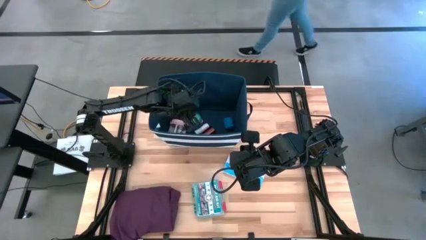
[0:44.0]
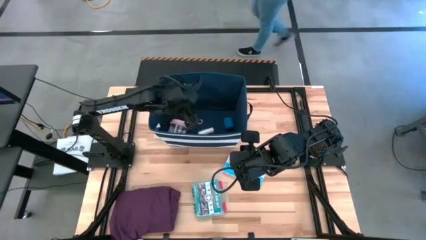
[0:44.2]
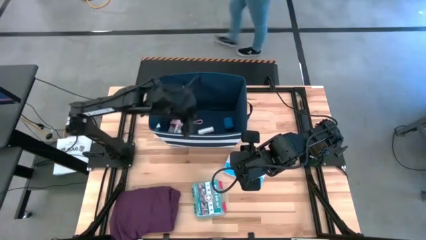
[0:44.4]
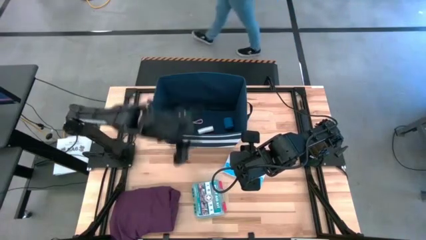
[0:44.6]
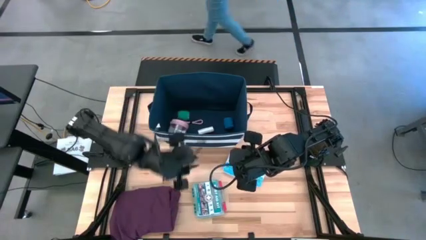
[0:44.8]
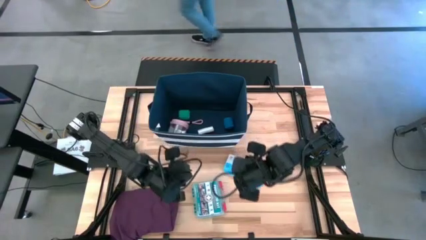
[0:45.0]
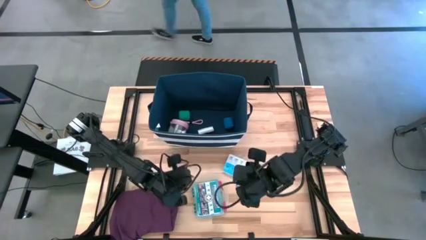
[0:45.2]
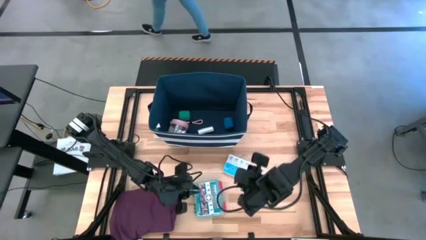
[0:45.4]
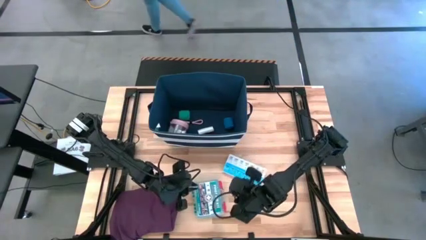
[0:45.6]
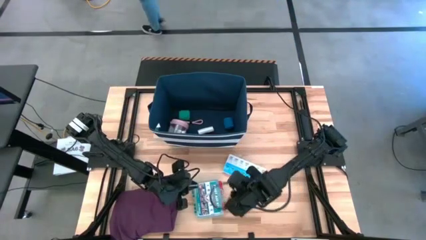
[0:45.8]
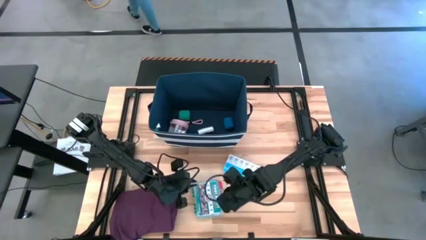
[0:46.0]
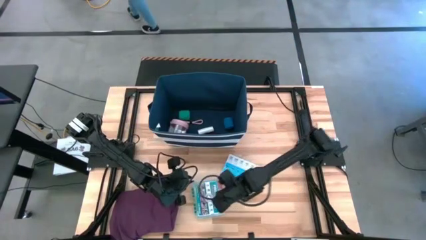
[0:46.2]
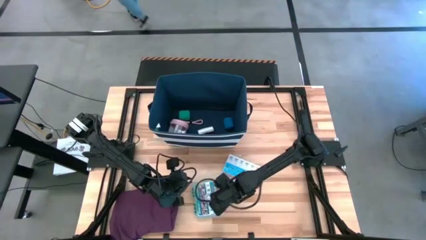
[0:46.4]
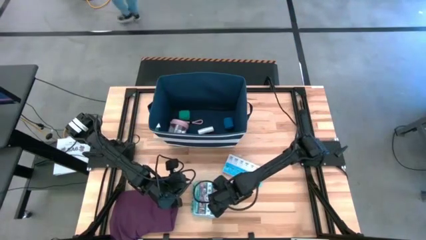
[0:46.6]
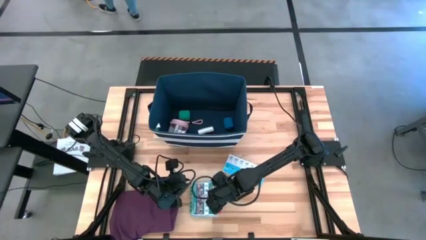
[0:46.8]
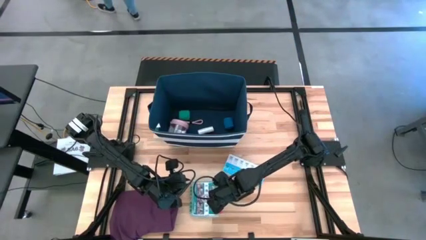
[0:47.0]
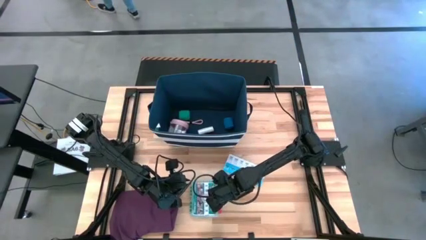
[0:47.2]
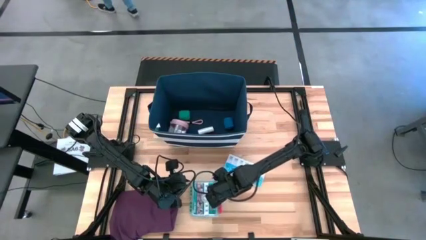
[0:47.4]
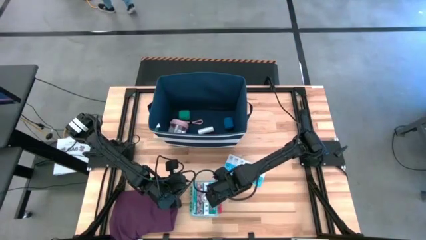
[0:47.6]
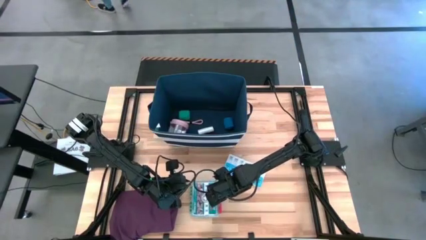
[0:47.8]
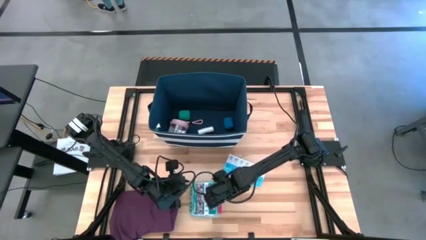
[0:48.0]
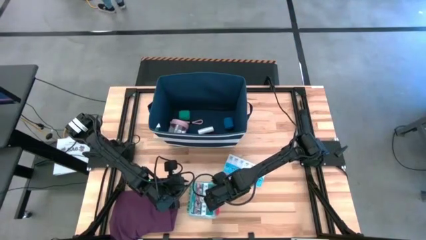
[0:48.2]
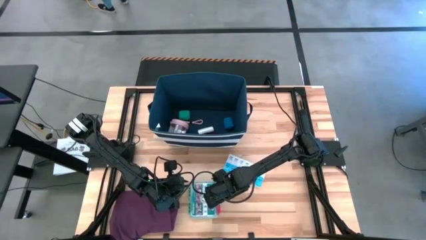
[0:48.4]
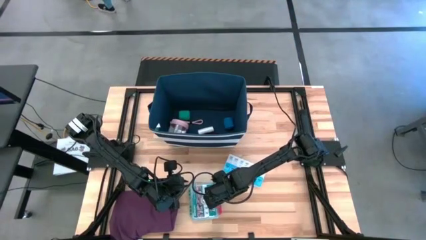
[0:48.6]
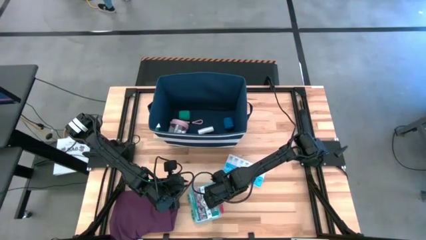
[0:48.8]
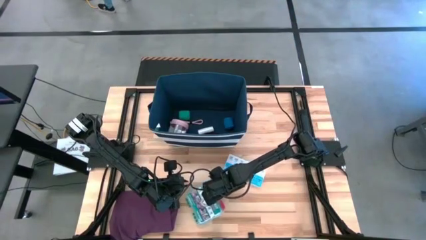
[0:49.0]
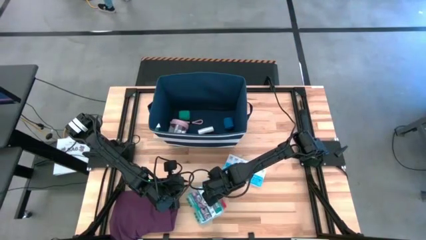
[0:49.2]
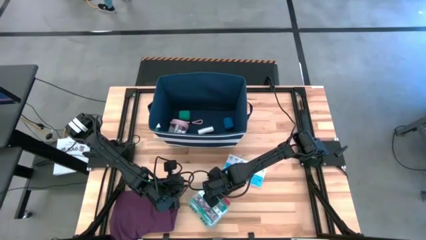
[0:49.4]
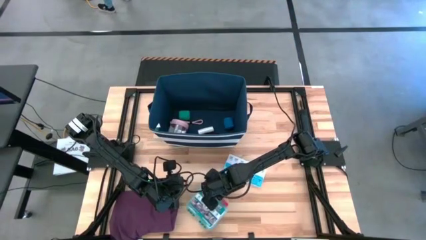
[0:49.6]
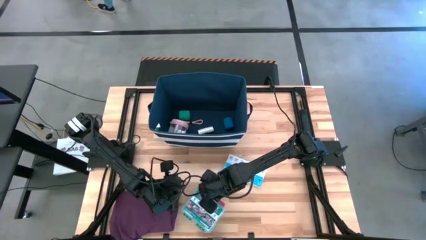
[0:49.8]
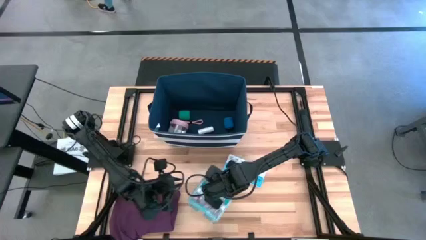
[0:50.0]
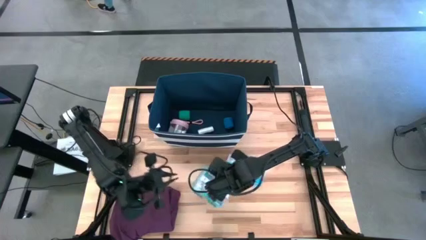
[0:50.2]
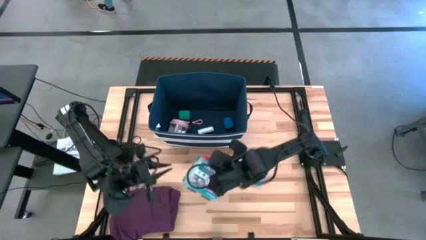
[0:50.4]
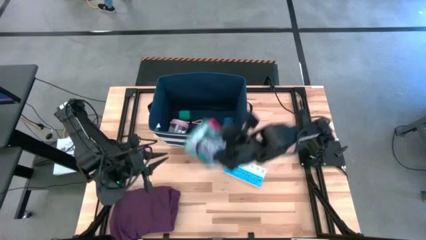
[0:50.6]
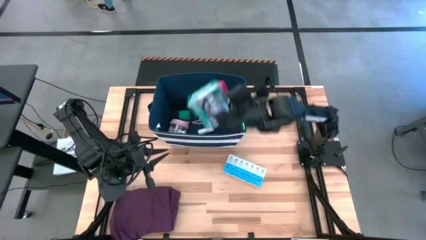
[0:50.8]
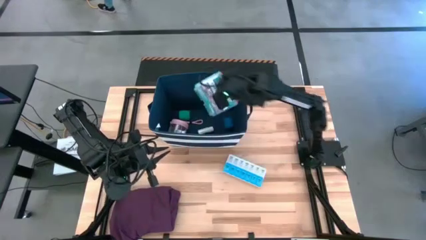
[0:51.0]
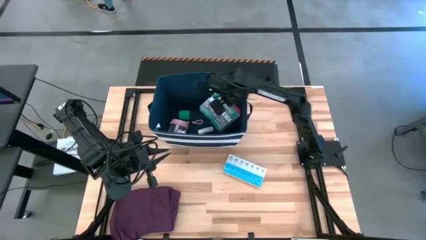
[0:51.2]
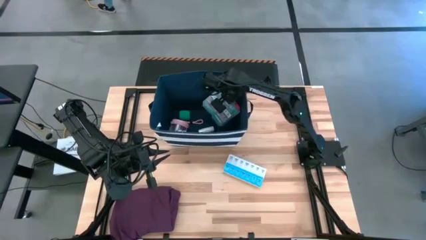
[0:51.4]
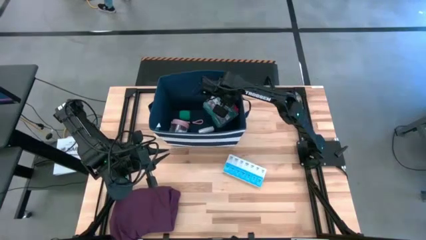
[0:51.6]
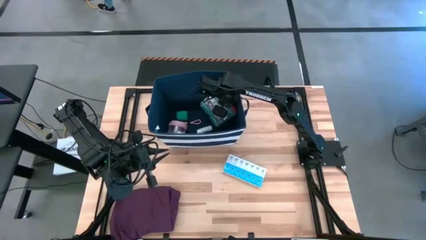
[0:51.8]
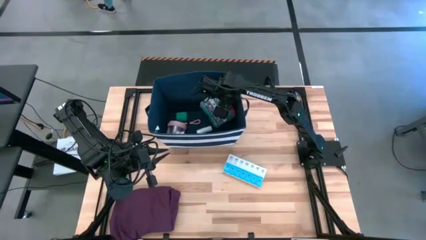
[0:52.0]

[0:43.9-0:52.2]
Task: Pick & place medical supplies in basket/bin
Put the green first aid kit into the blue bin

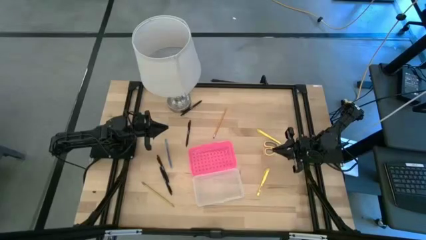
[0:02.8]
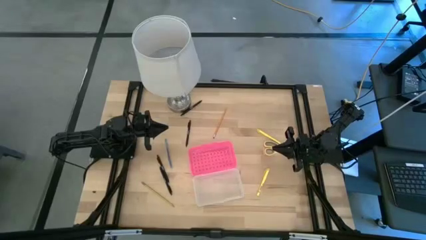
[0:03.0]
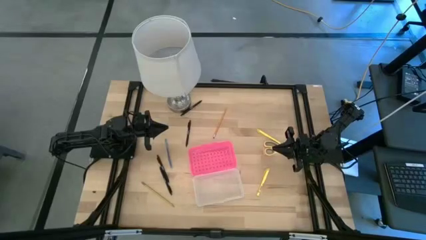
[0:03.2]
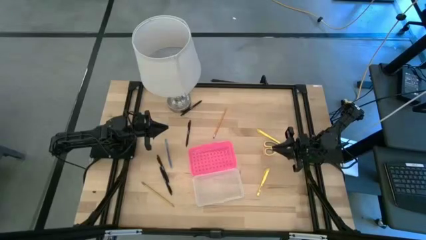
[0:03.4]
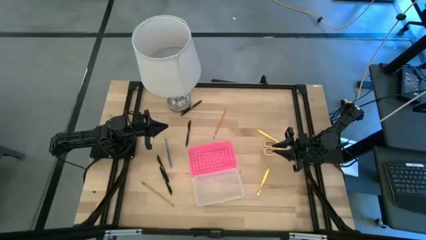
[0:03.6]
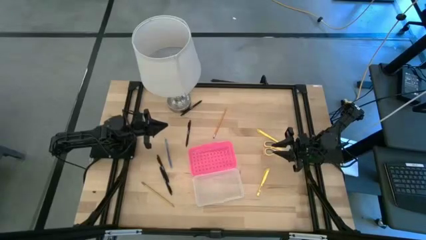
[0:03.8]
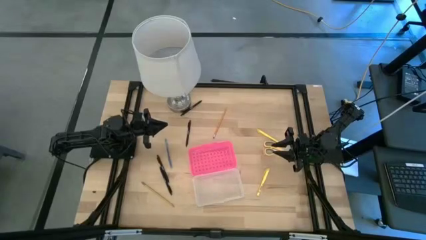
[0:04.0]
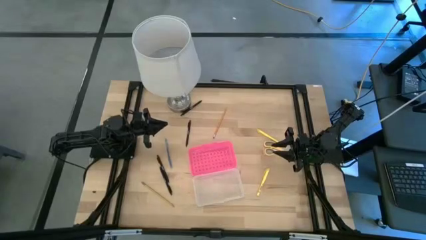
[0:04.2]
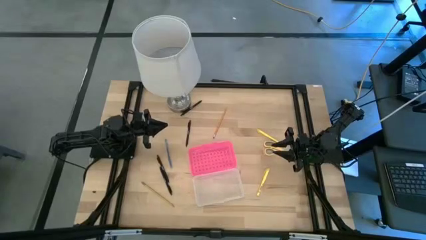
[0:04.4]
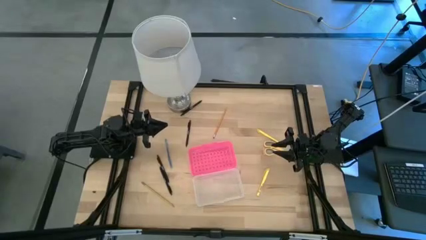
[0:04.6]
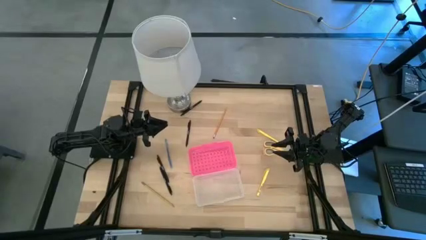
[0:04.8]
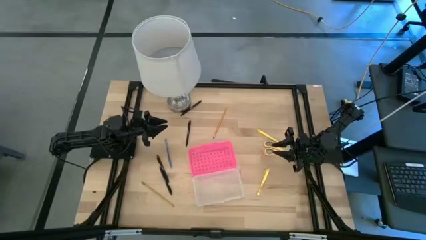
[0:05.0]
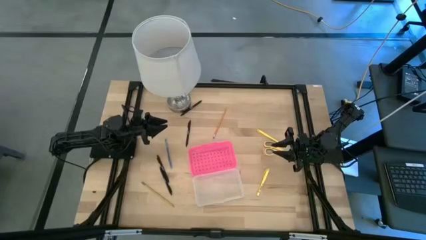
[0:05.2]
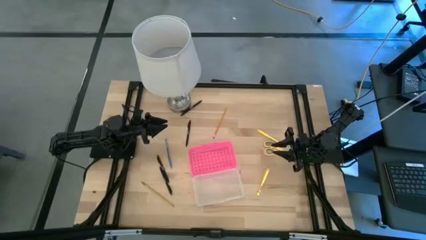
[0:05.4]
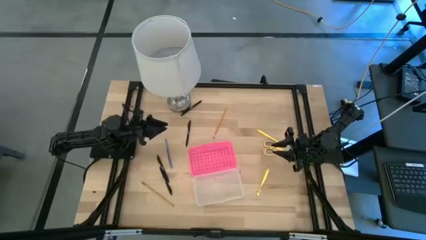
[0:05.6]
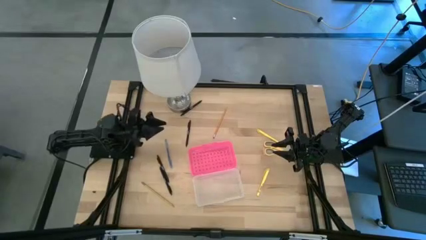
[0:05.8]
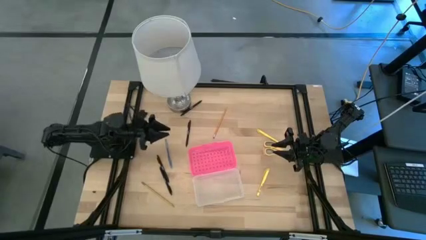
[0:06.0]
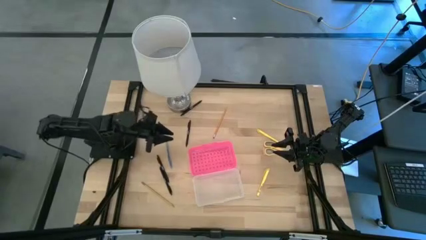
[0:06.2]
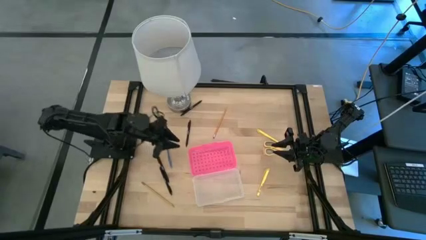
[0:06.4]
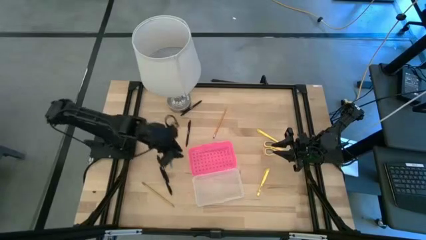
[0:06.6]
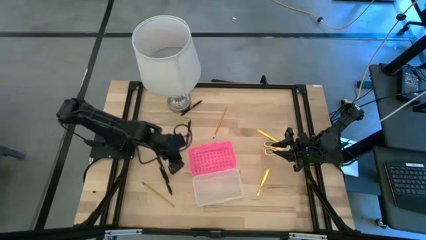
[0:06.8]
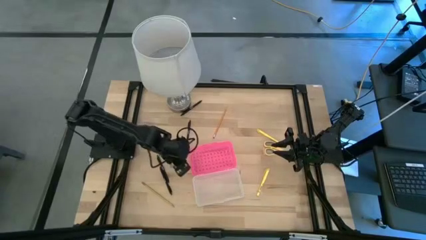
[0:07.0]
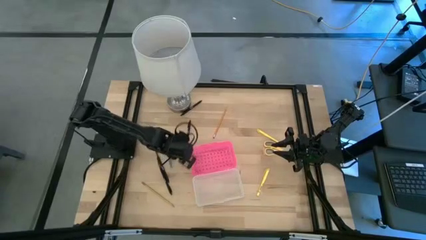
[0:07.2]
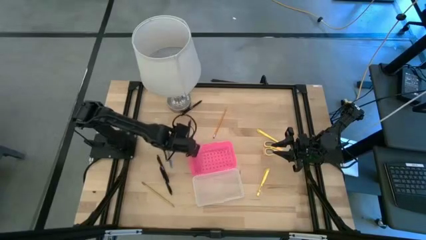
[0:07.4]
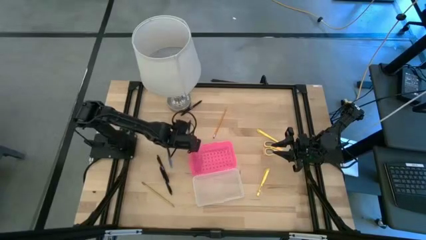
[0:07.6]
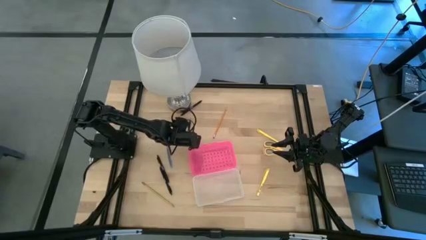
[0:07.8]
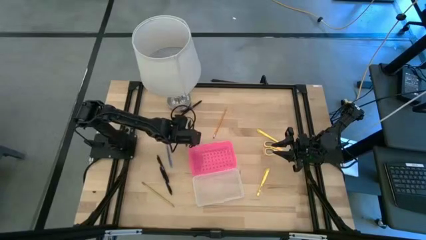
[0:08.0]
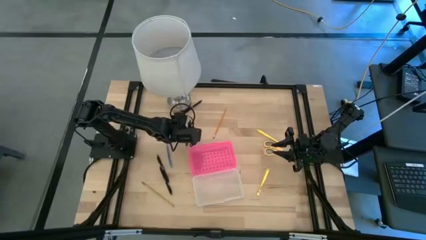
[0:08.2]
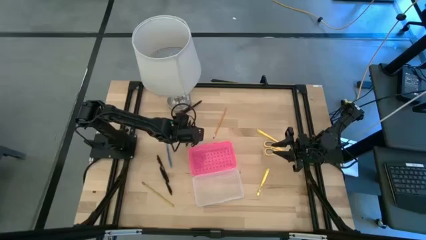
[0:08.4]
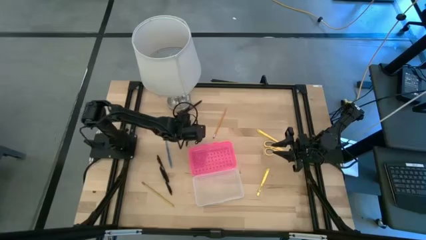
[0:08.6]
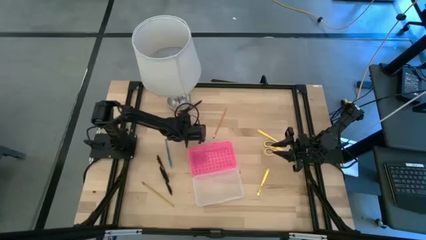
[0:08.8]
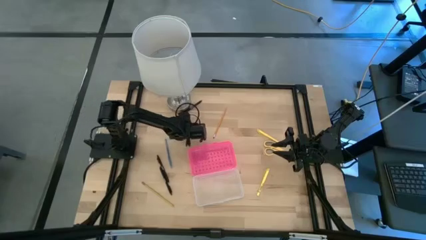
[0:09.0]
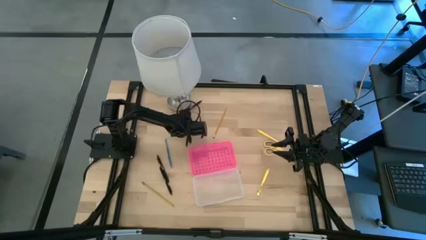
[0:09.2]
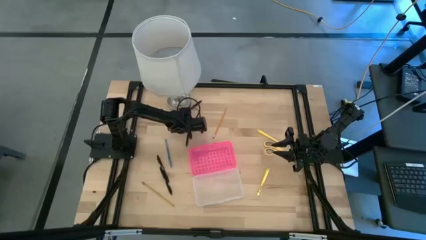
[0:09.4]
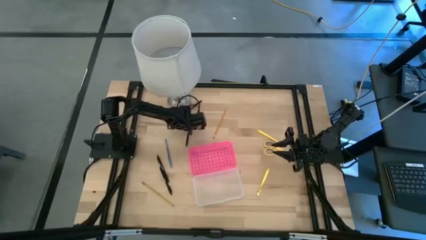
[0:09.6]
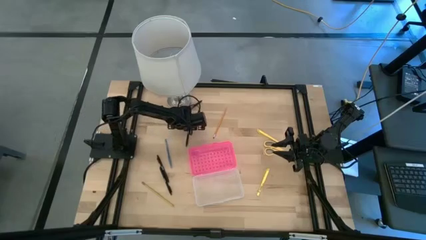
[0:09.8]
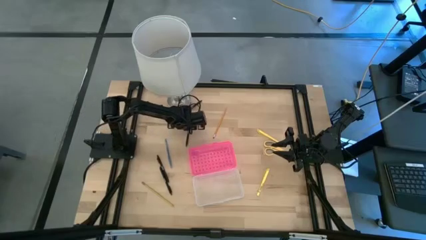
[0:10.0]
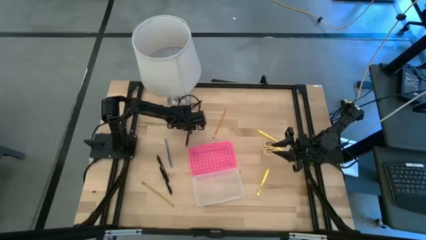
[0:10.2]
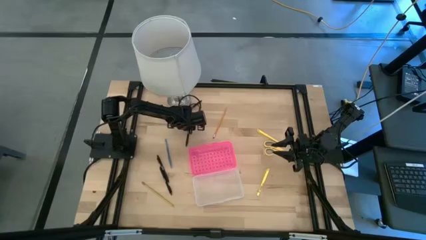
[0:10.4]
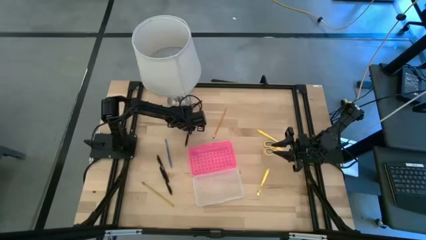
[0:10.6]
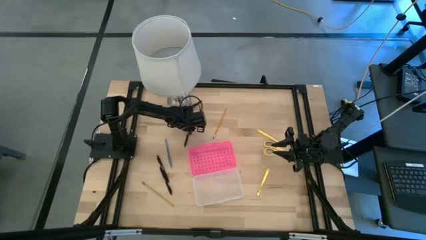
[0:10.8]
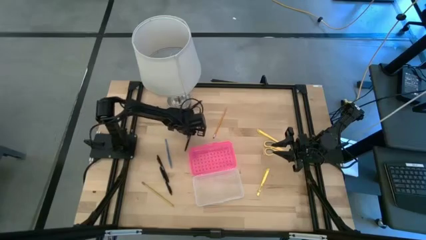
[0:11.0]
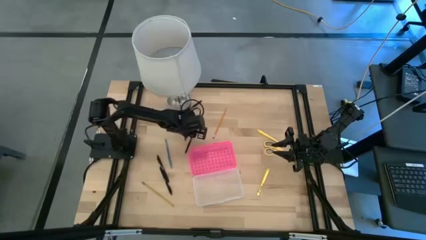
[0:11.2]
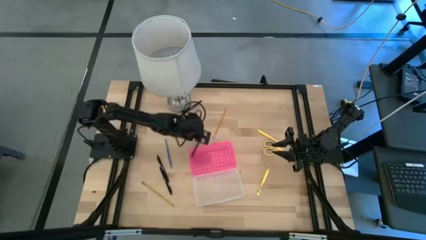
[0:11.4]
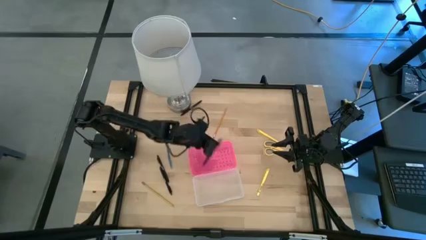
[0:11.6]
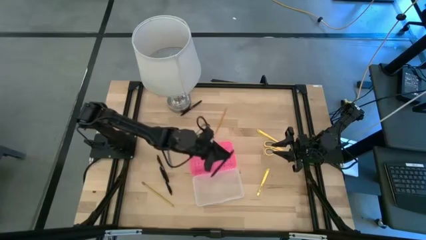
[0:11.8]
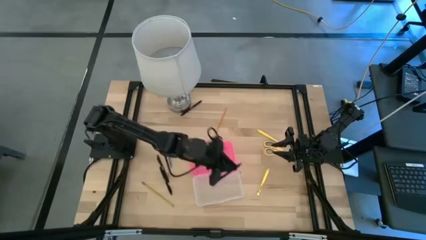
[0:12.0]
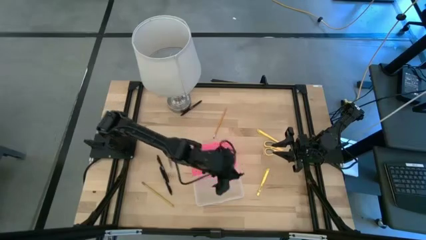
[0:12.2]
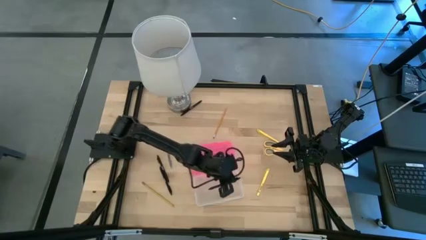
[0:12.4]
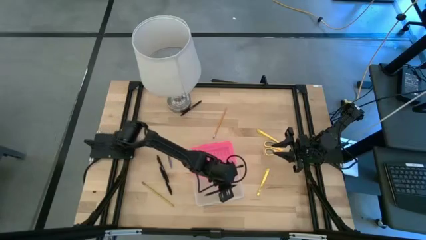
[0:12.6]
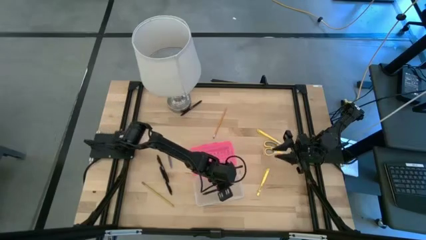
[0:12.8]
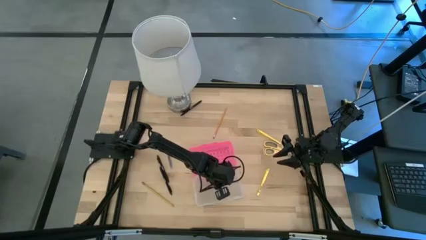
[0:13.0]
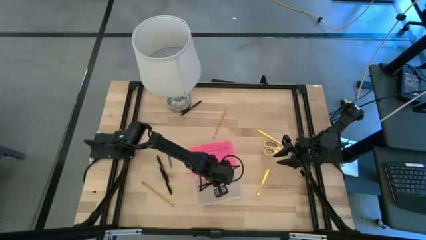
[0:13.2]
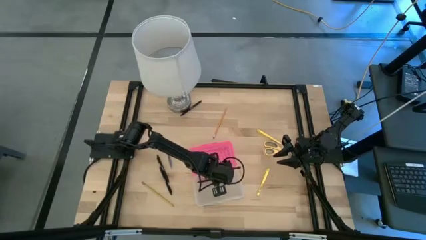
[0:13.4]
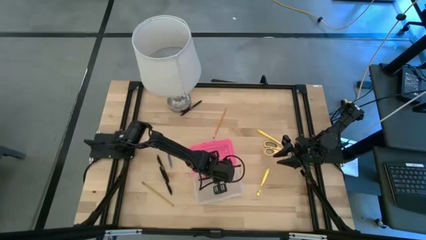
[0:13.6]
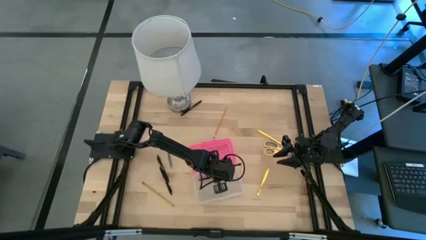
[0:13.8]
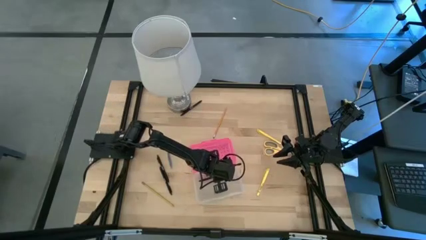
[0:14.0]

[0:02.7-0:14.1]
Task: Pick & place school supplies into a supply box
Put the black pen into the transparent supply box
